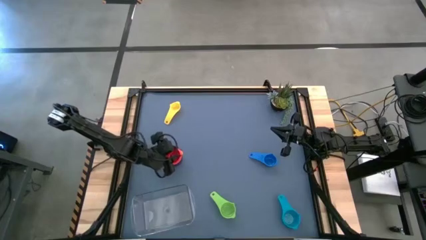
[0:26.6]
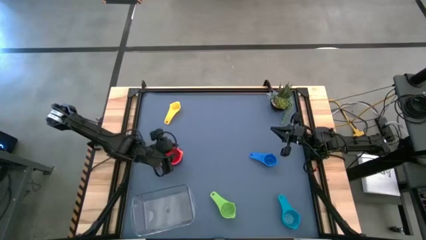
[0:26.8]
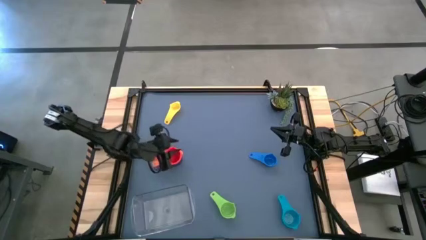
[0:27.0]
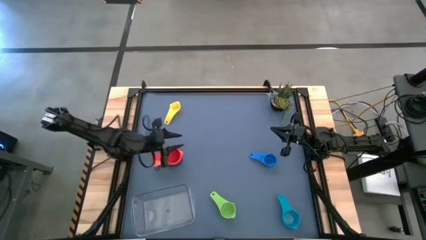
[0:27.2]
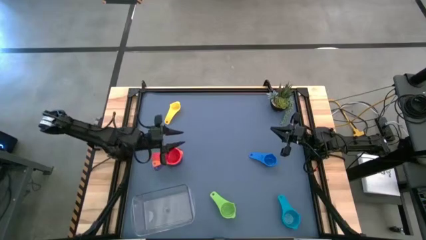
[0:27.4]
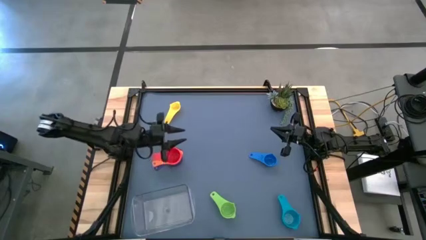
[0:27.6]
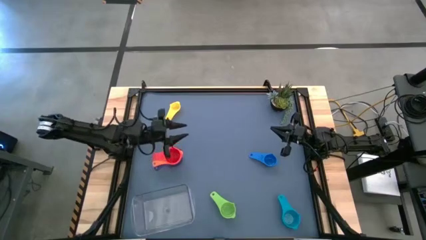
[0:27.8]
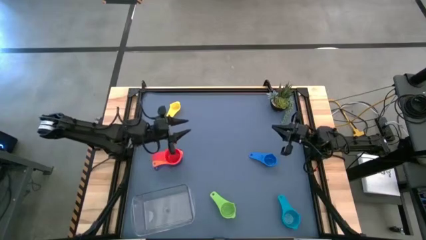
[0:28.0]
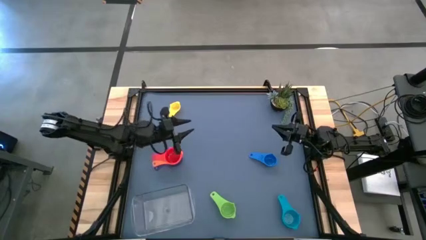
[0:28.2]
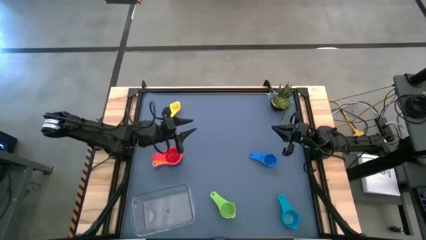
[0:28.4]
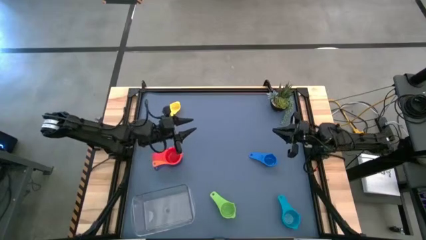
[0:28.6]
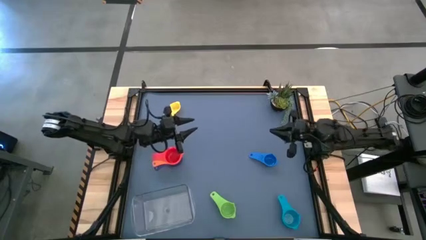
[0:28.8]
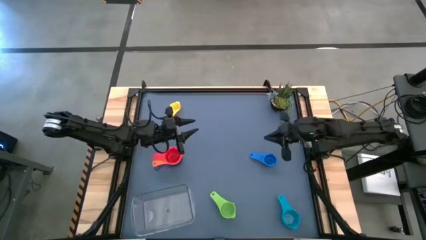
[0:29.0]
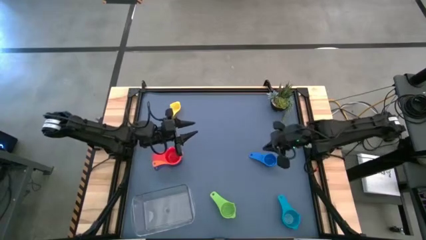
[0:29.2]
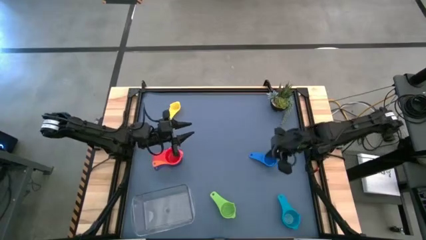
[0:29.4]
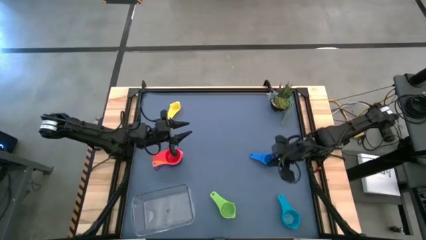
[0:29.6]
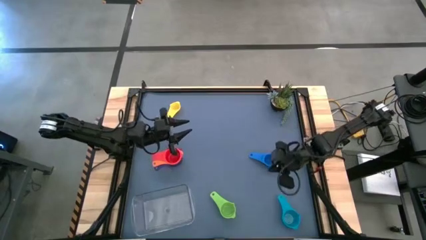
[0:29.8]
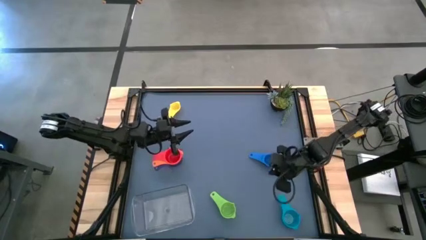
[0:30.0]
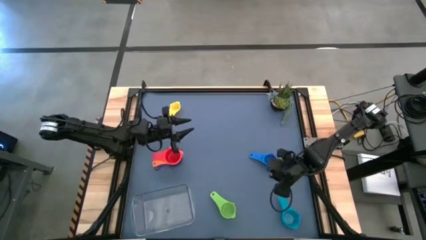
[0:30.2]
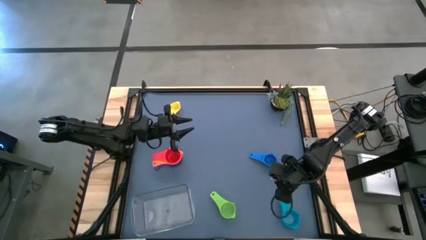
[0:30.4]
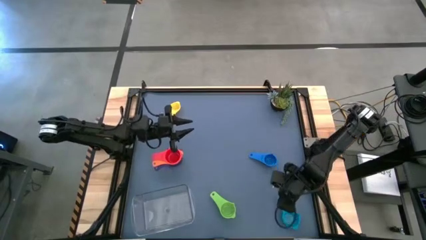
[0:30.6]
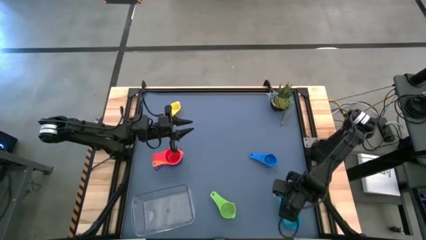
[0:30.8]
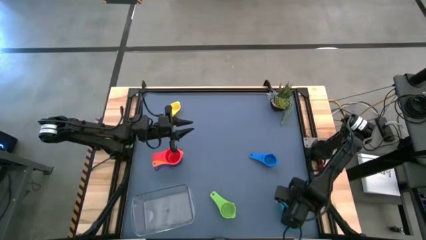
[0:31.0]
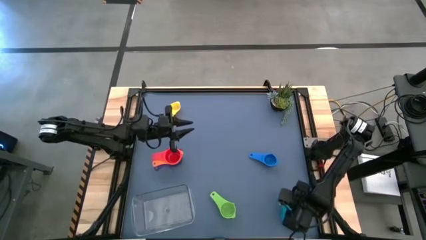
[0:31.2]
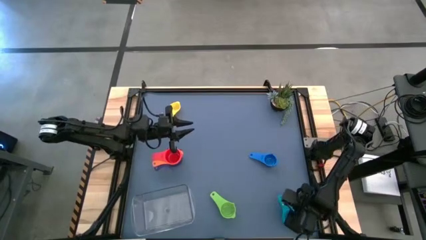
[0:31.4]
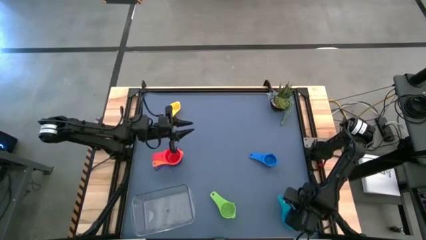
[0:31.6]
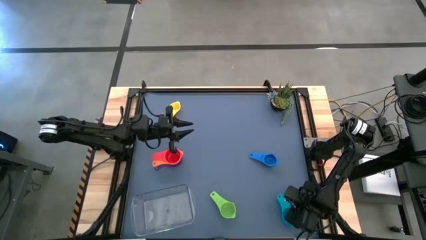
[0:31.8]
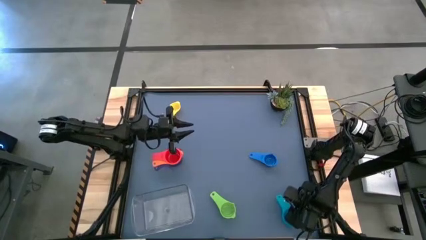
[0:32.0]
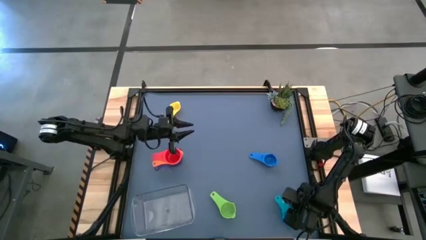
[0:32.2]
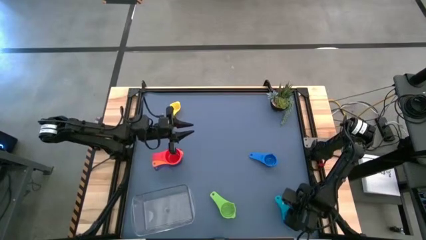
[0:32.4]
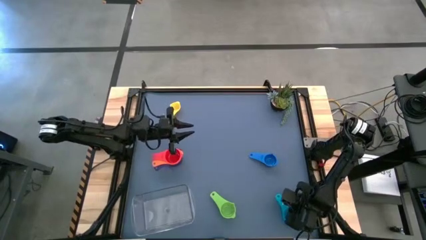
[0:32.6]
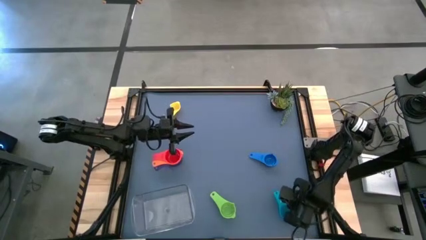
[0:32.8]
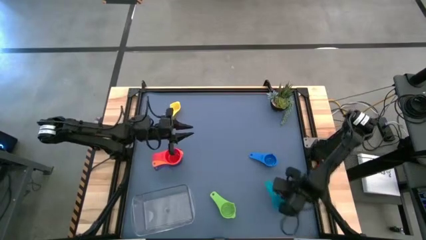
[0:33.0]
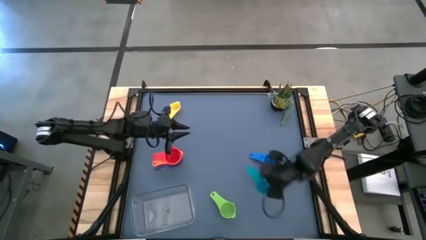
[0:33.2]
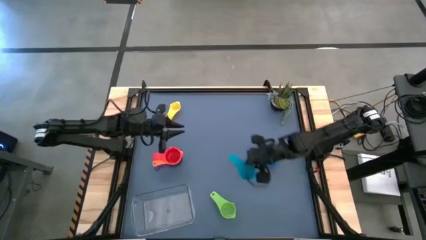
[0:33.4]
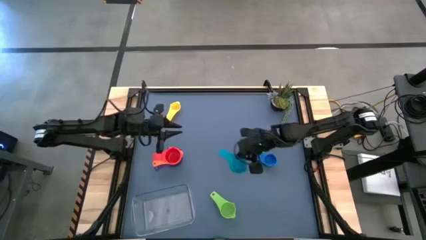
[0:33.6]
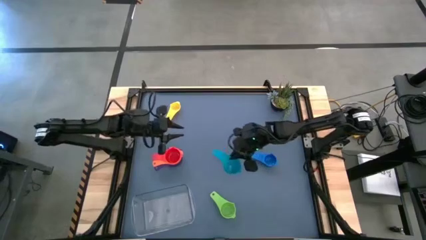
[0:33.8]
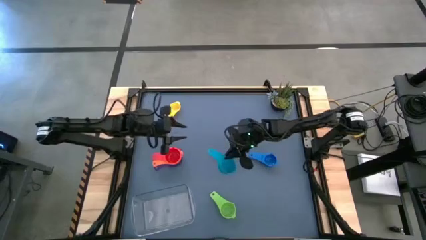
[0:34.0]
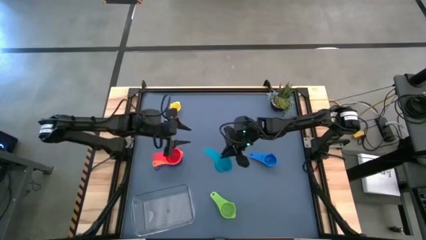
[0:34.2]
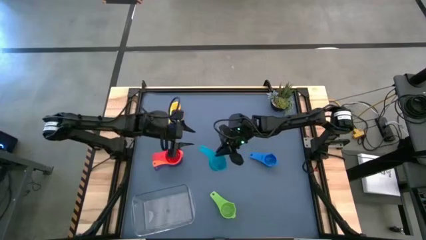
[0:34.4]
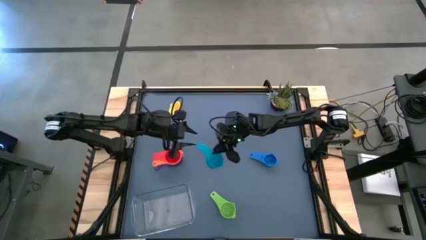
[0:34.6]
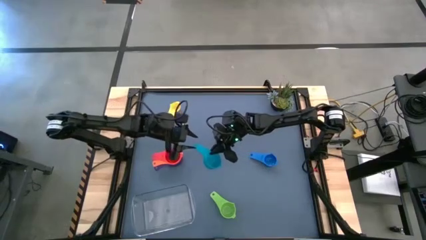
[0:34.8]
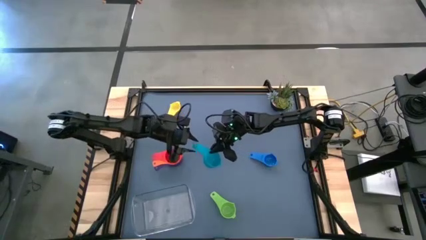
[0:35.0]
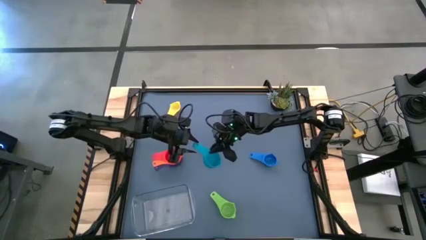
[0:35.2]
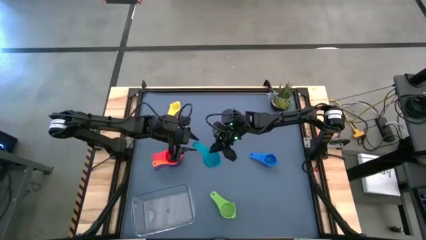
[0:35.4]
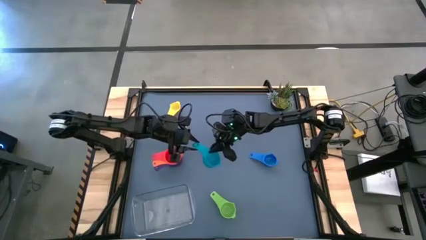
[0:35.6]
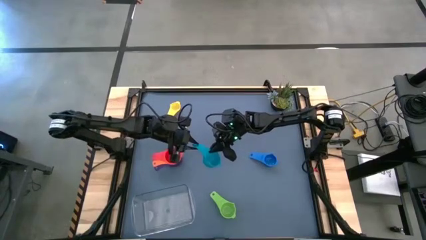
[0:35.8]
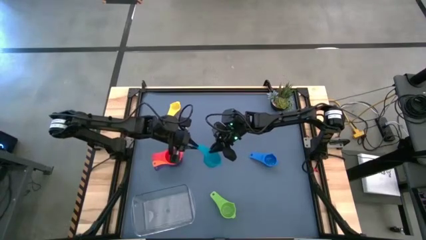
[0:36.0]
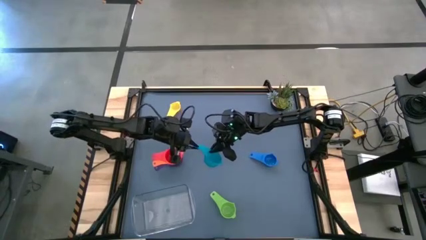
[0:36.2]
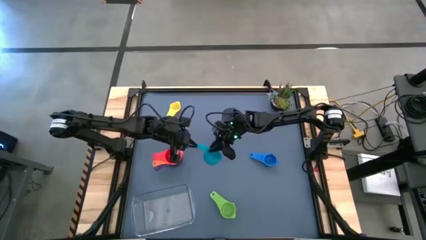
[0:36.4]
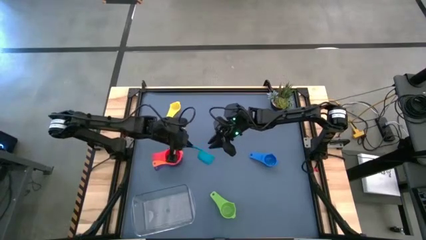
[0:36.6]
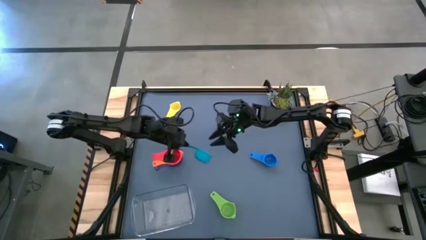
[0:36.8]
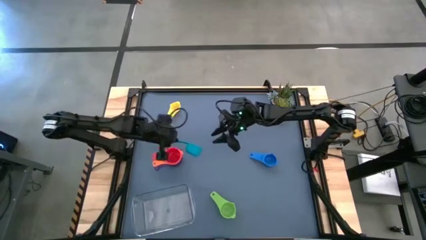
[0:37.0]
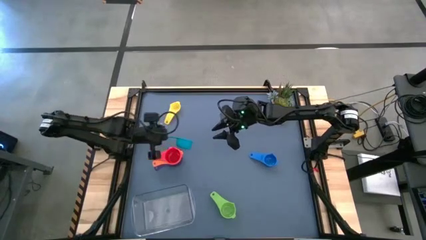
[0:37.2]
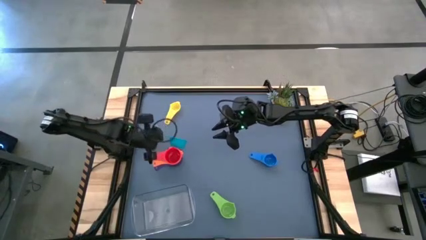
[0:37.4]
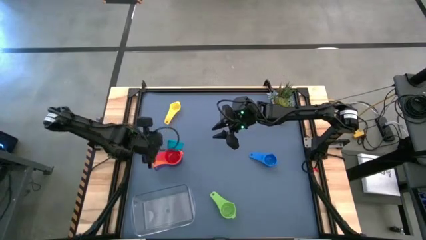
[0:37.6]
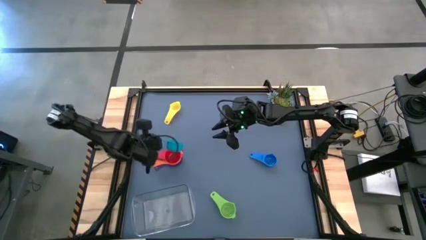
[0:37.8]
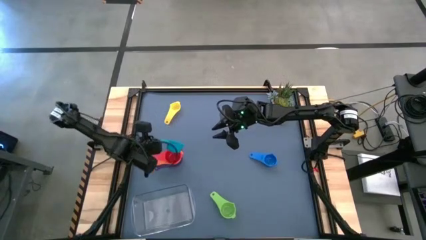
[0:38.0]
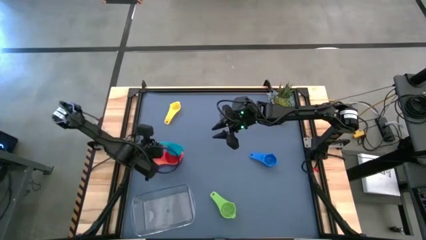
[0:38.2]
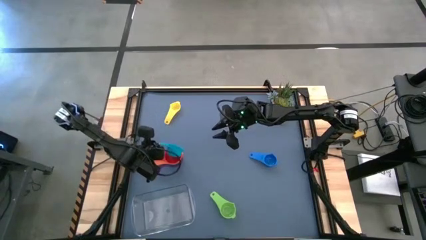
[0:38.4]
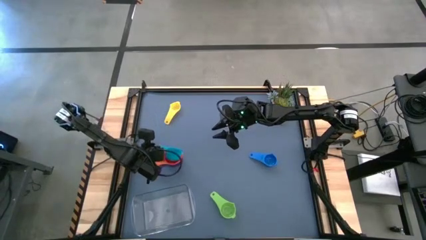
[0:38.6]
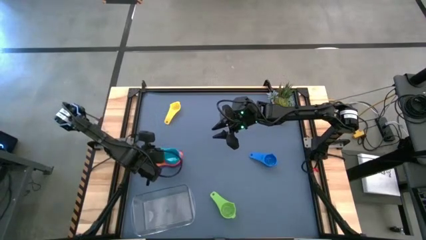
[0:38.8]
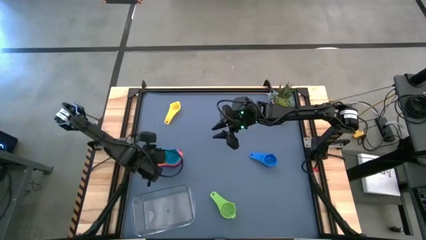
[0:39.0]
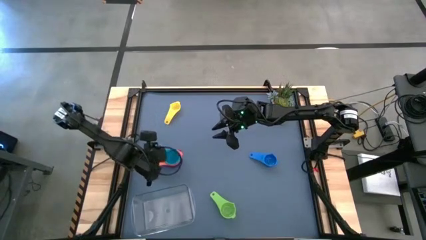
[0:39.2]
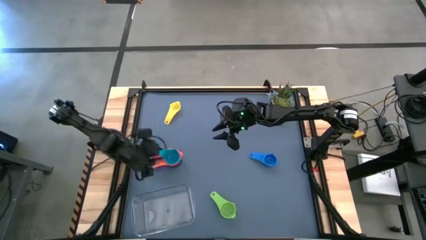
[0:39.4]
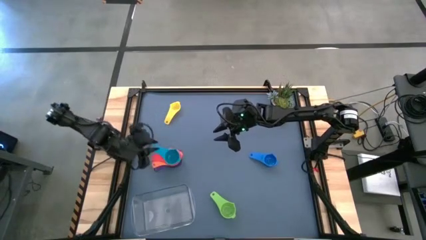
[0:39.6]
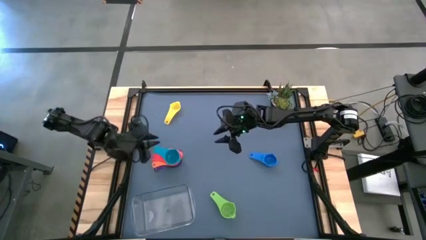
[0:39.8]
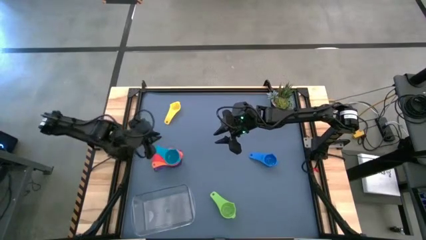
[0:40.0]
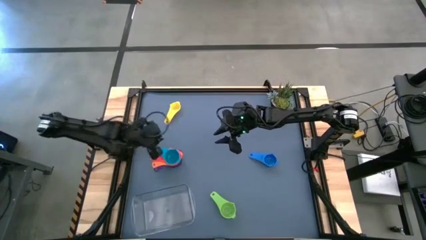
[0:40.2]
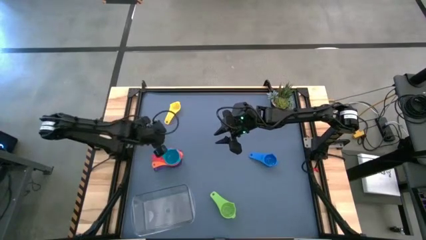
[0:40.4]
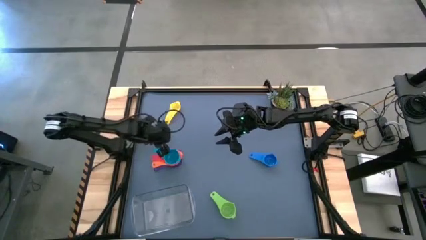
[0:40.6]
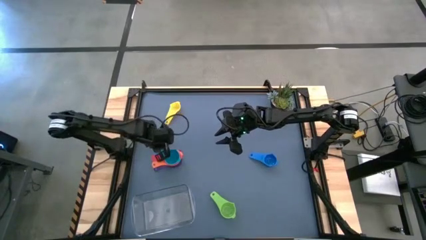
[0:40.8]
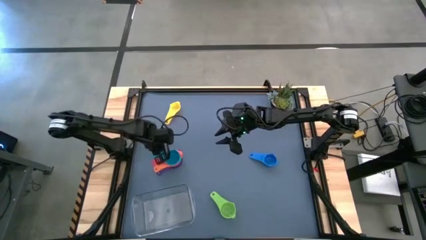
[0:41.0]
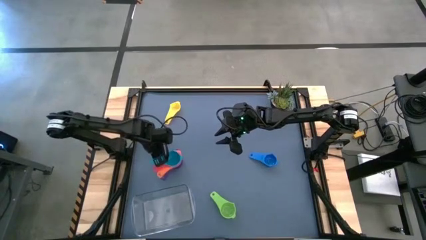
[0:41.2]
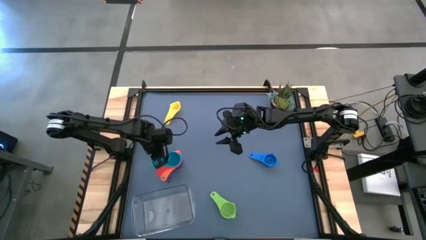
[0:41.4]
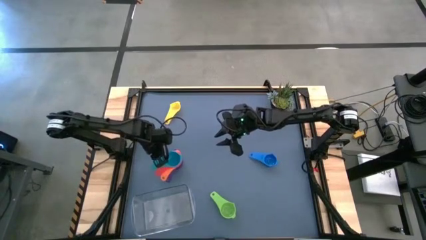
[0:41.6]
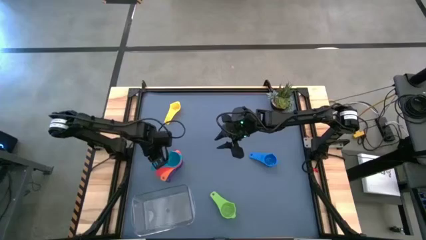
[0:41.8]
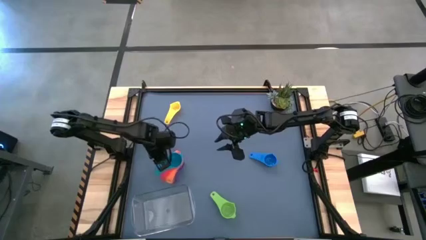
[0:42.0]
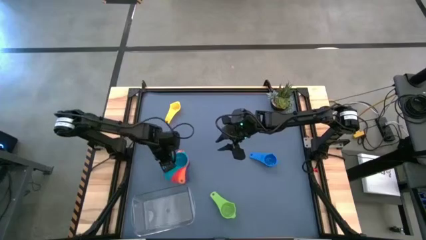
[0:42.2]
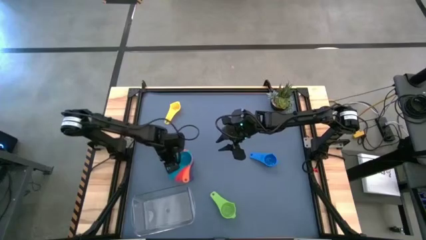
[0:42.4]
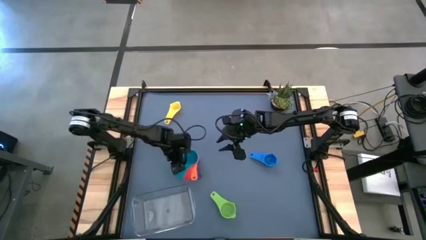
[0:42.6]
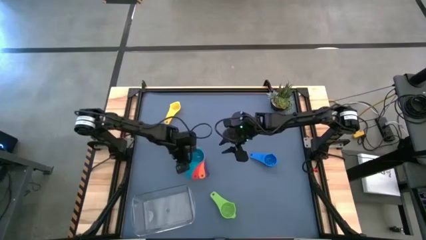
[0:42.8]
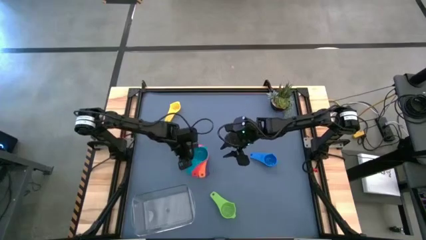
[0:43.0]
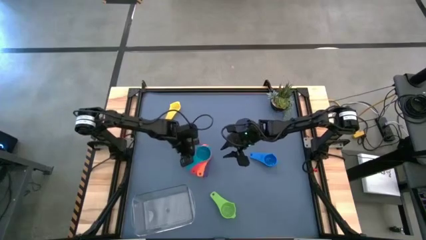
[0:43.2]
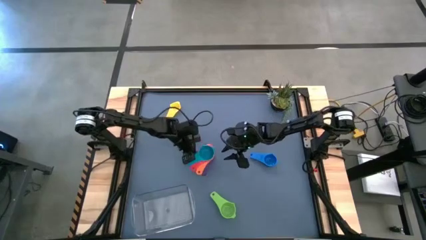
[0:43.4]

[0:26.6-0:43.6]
Task: Nest measuring cups in basket
Stack the light blue measuring cup on top of the red measuring cup
